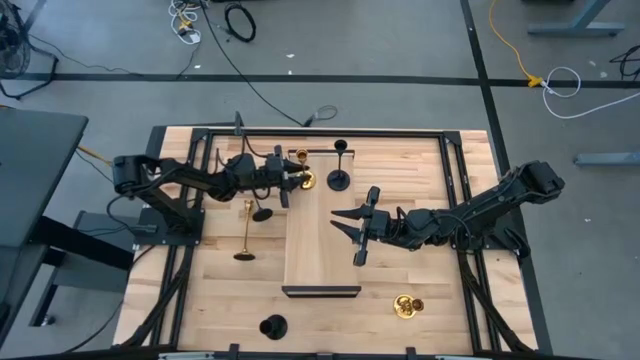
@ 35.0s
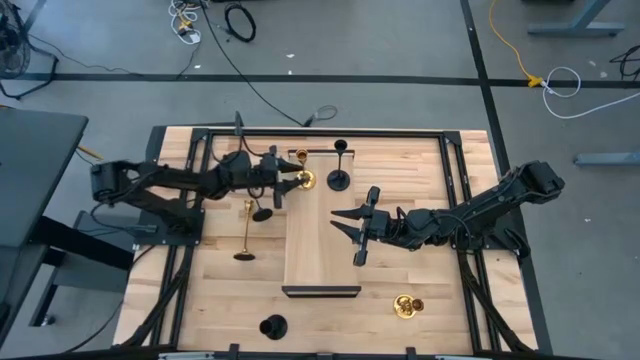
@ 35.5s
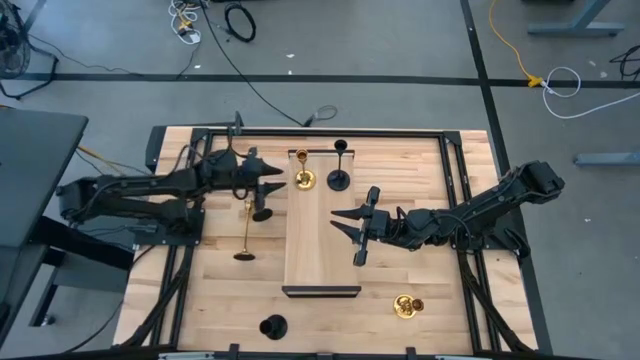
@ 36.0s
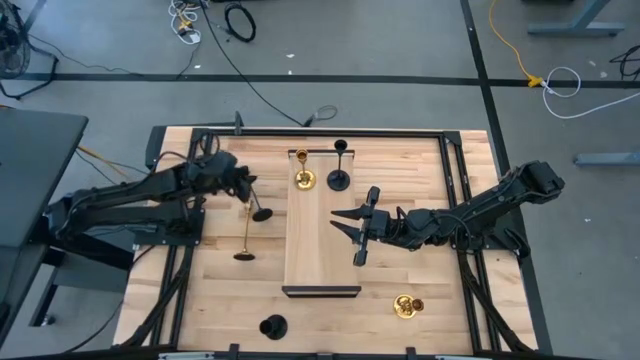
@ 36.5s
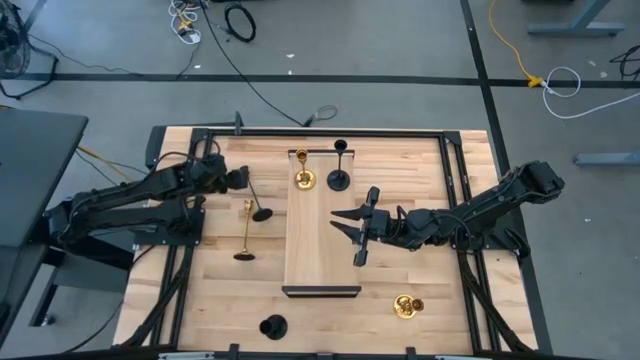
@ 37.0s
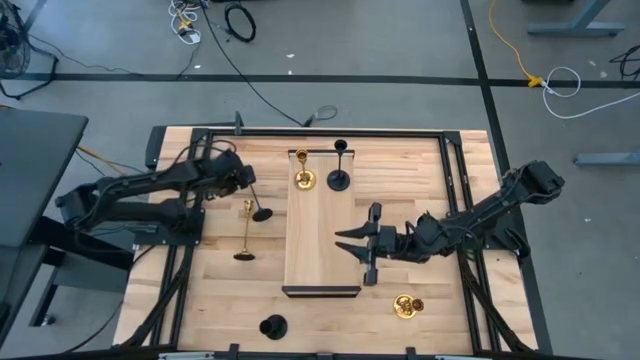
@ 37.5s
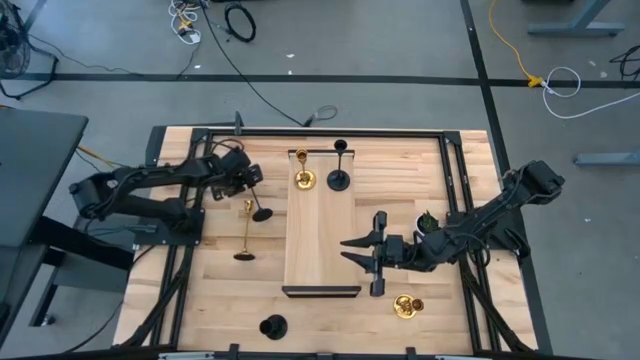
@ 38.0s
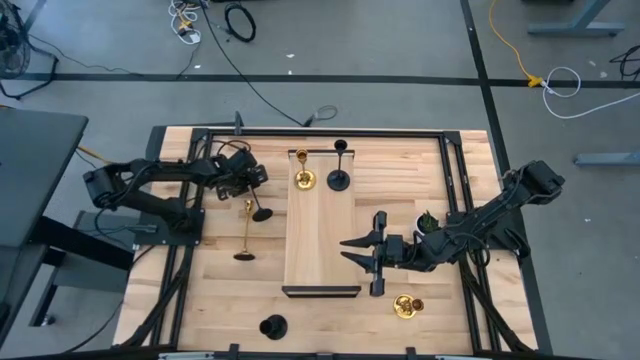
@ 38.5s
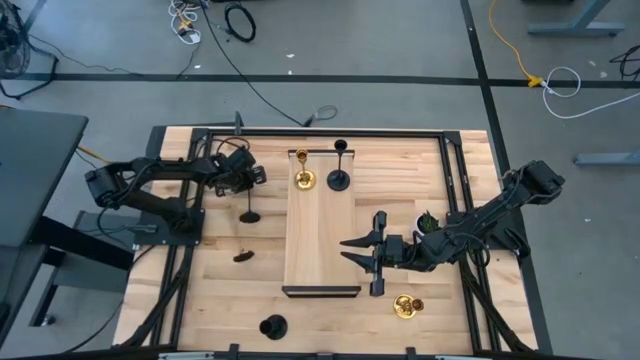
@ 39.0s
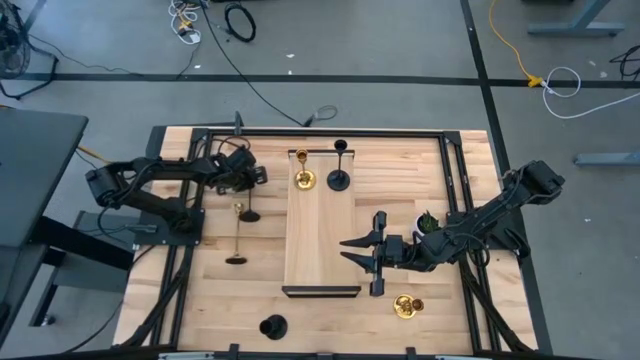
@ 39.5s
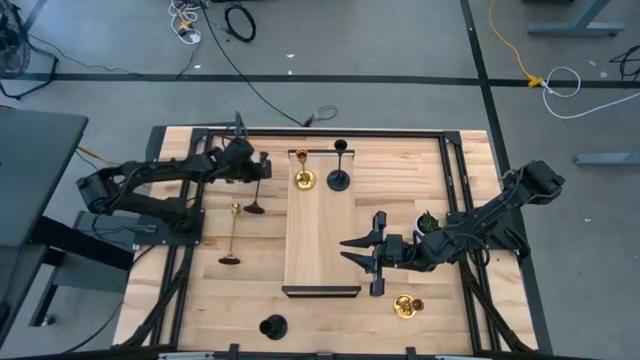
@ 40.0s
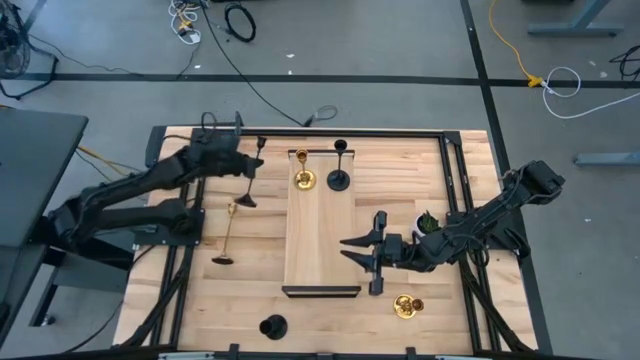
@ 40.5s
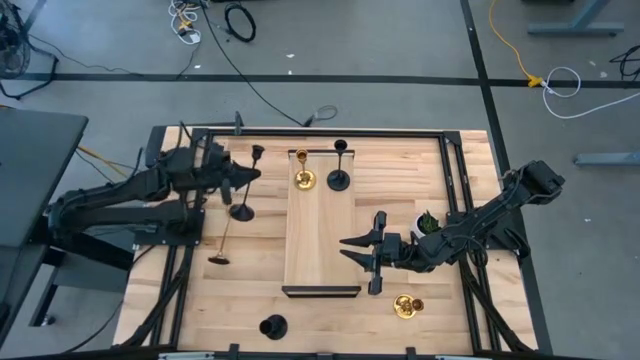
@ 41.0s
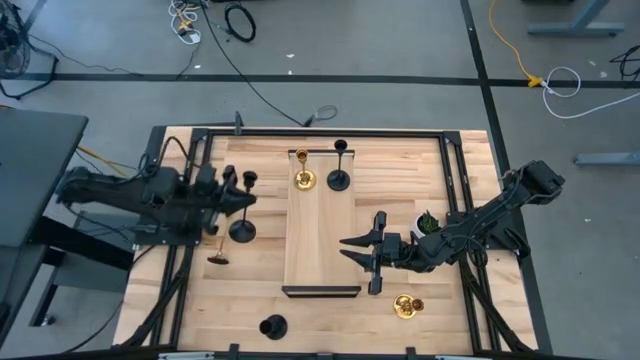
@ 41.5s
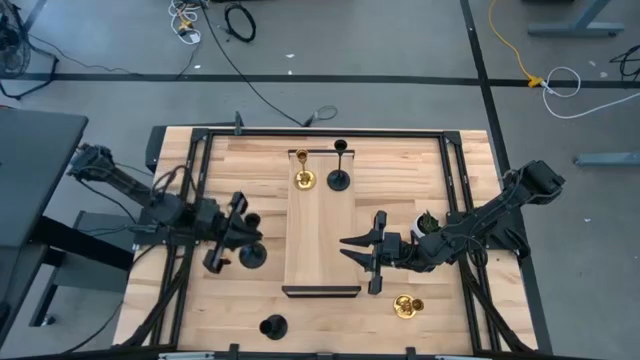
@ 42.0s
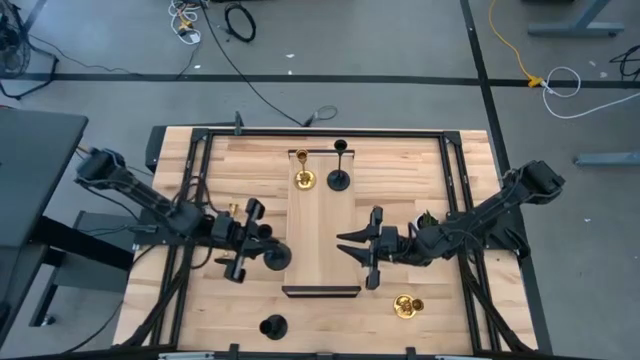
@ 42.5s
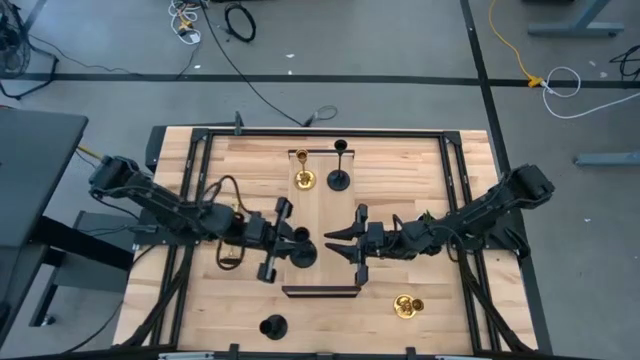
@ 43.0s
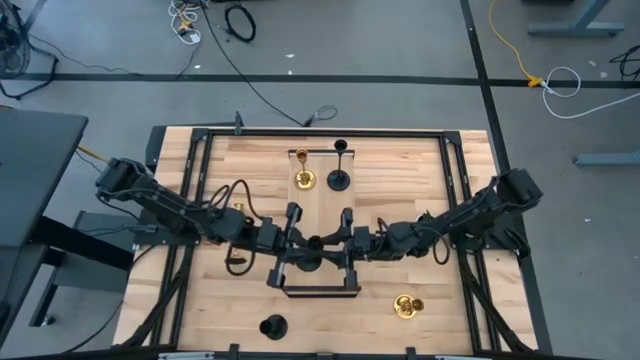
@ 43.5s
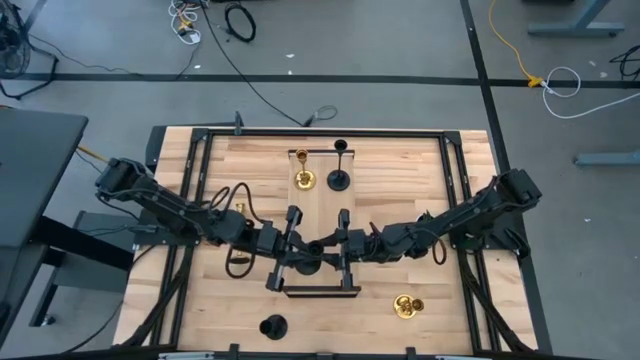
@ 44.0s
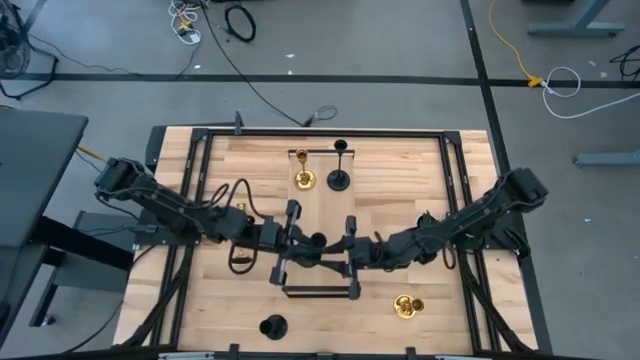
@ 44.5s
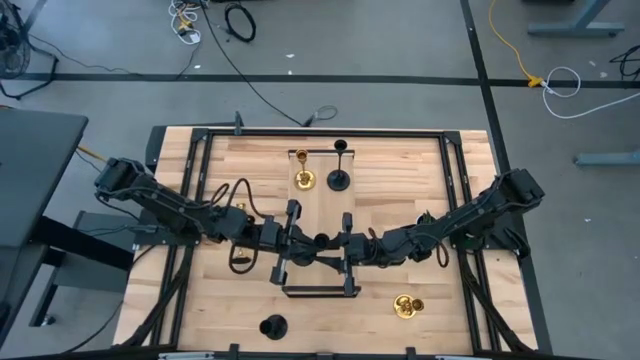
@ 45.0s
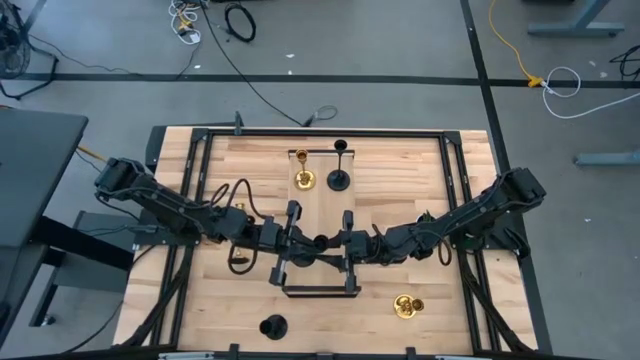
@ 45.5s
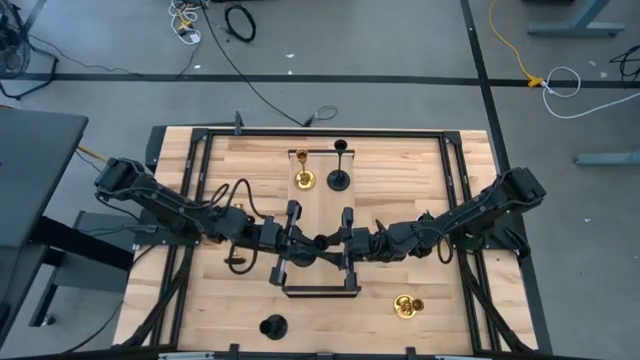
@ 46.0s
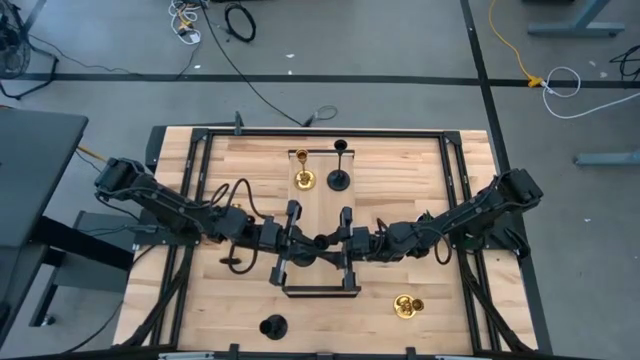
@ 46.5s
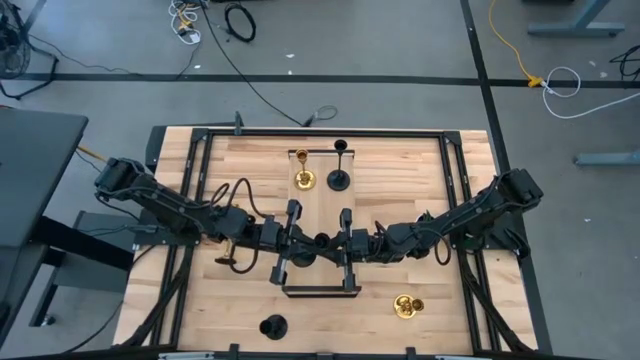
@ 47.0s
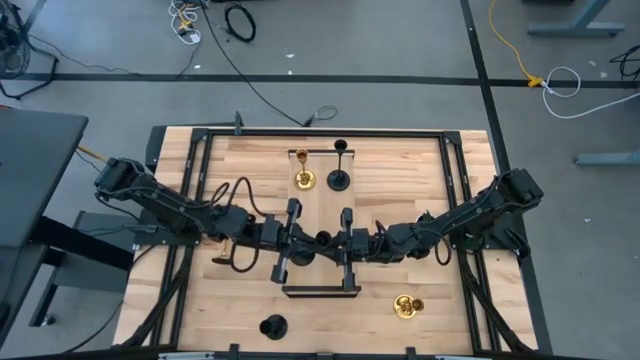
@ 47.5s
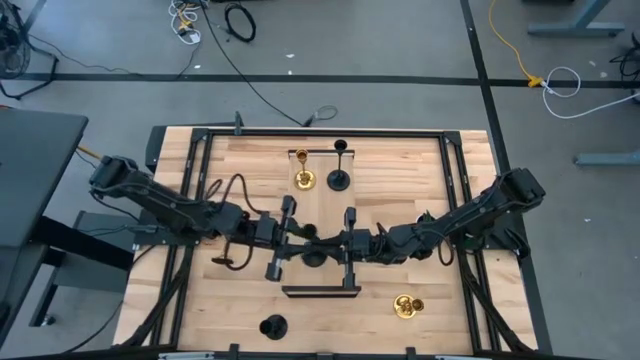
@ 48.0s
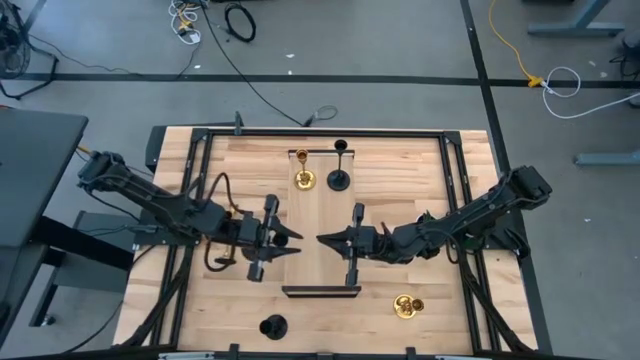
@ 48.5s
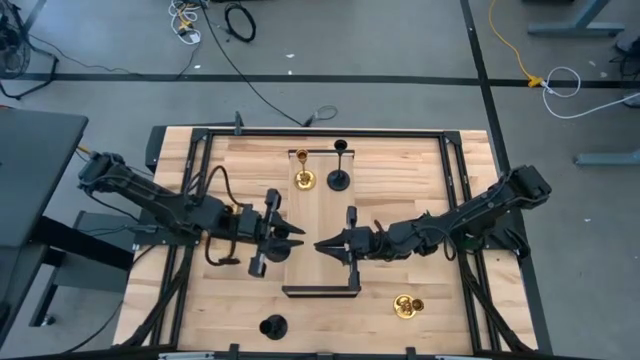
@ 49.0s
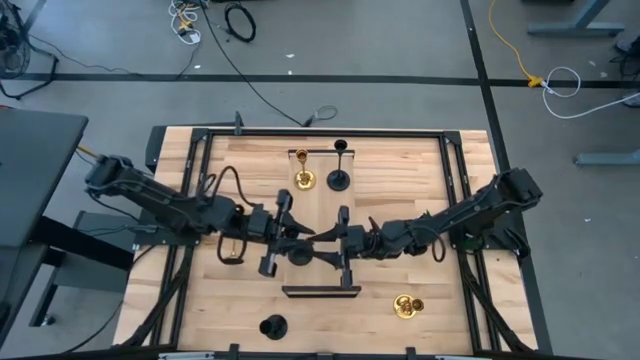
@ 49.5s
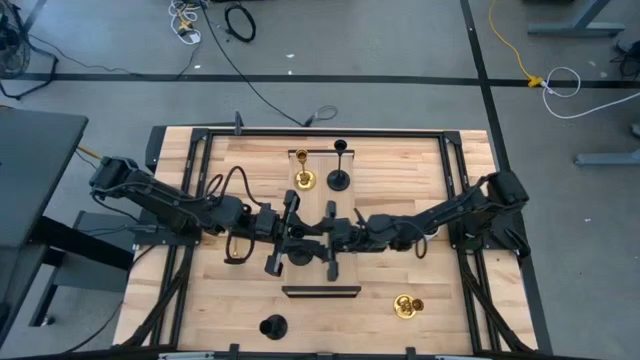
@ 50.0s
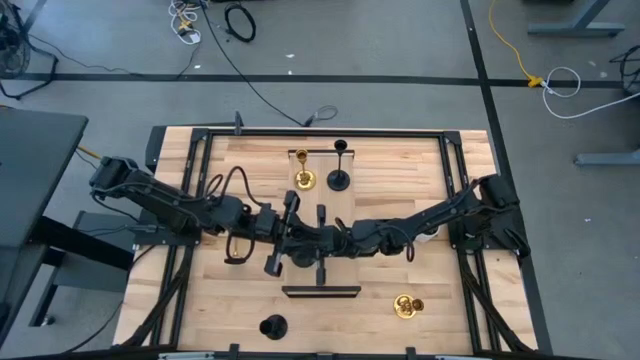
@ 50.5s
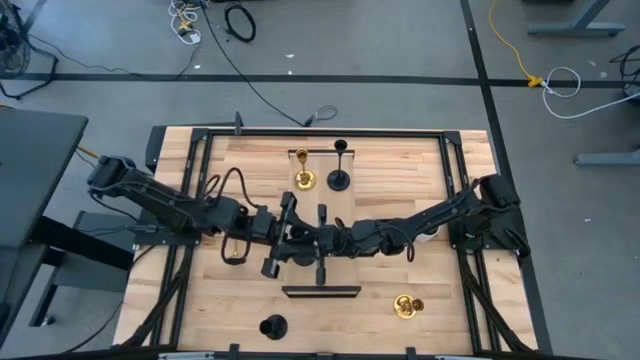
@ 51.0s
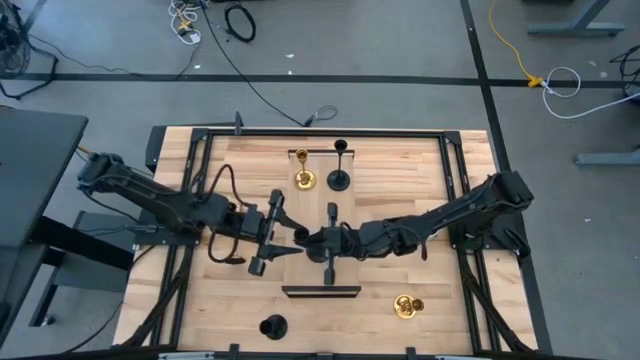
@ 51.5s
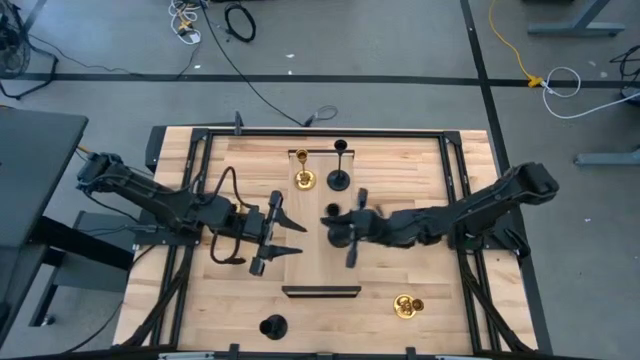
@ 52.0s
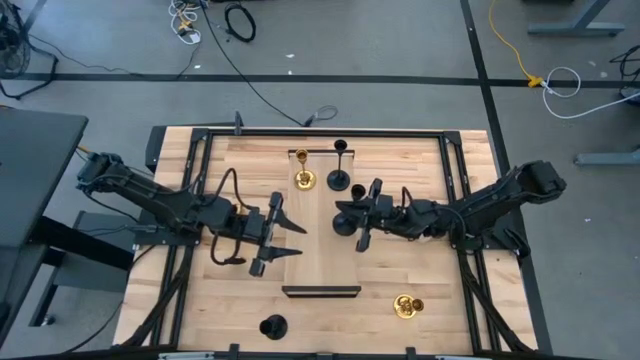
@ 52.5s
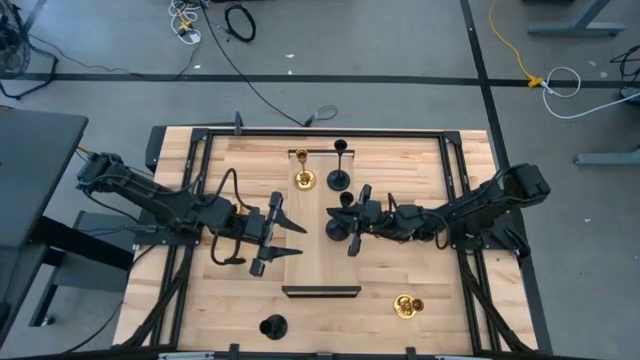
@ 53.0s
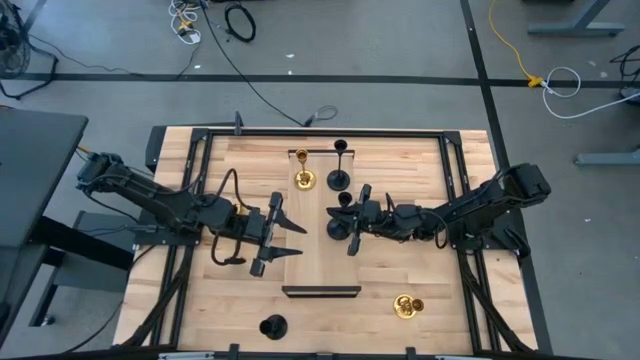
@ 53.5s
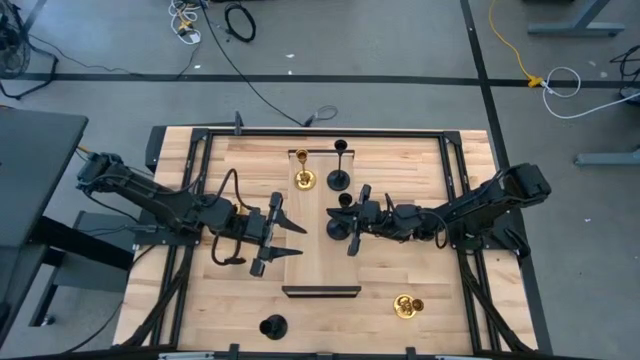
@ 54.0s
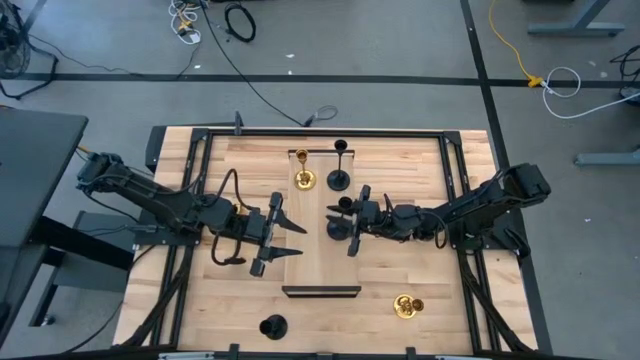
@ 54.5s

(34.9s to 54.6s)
Task: Pick & Place candle stick holders
Put the top black candle holder on the shelf

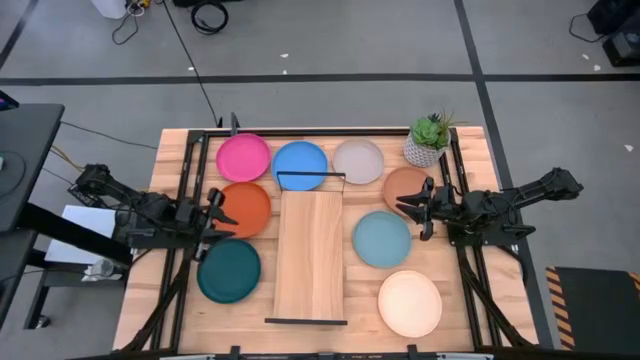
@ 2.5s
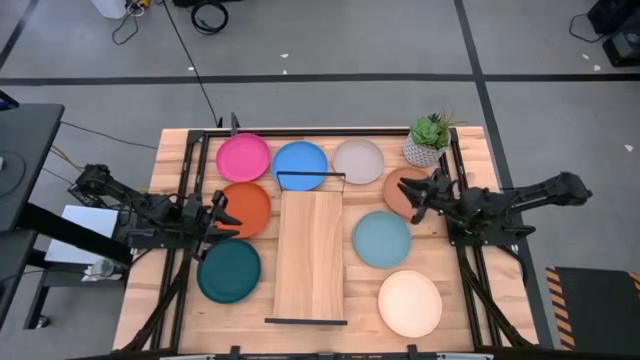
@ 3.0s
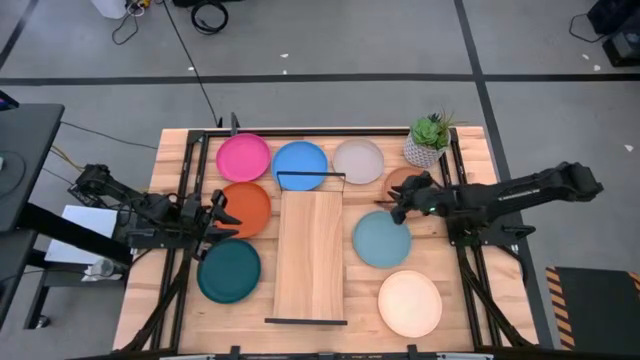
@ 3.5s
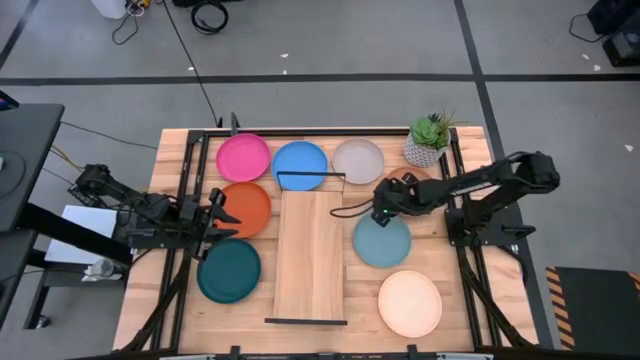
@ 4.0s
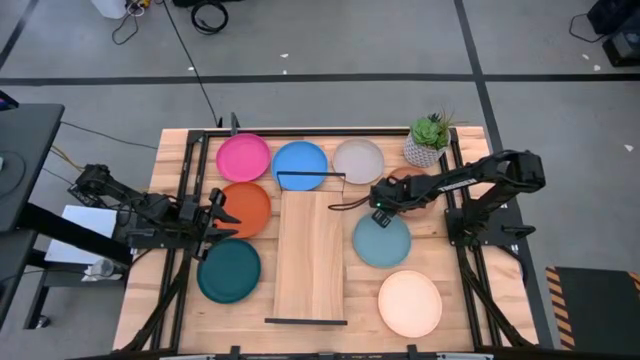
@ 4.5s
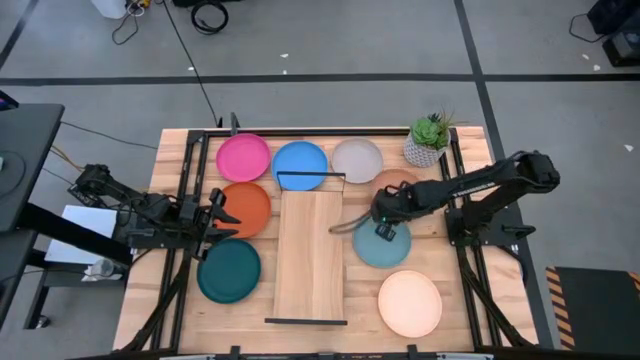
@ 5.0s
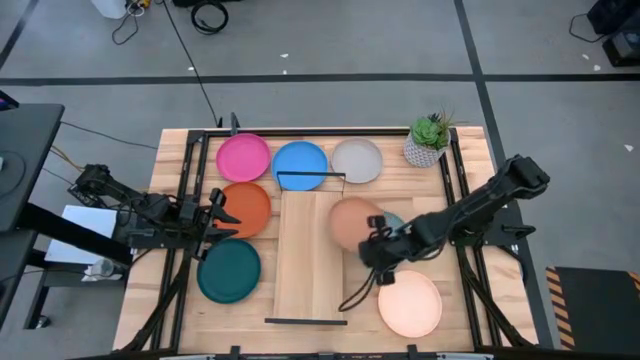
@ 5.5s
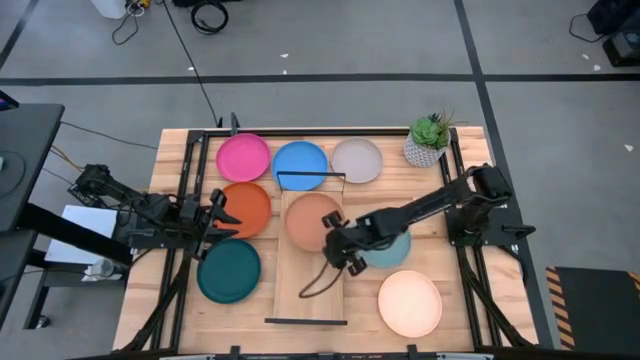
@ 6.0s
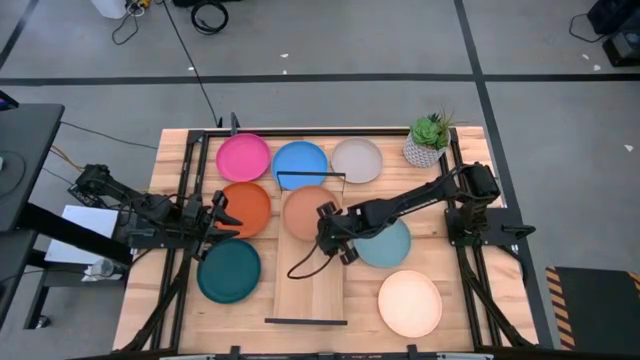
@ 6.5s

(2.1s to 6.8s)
Task: Place and stack plates onto a shelf
Put the brown plate on the shelf
